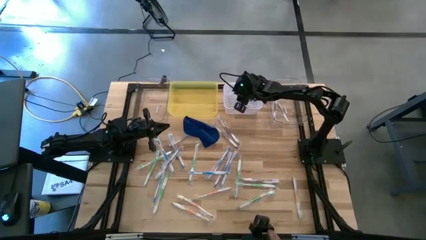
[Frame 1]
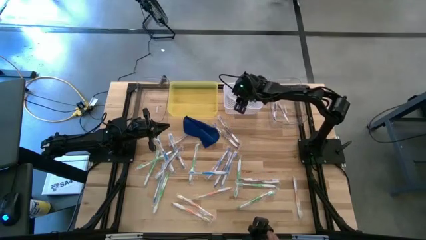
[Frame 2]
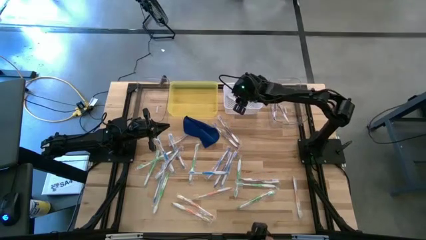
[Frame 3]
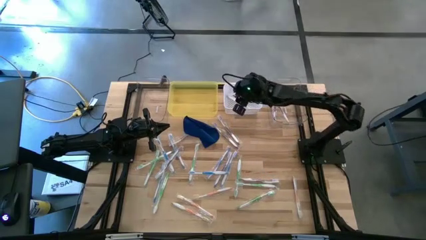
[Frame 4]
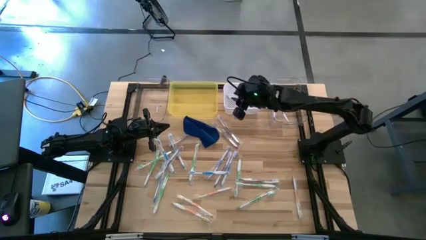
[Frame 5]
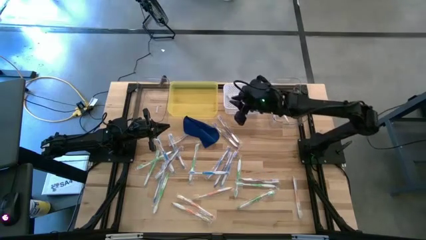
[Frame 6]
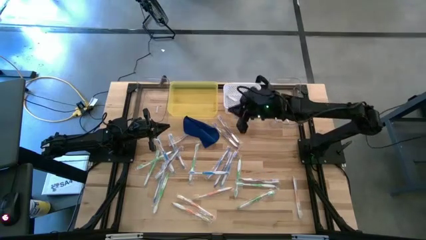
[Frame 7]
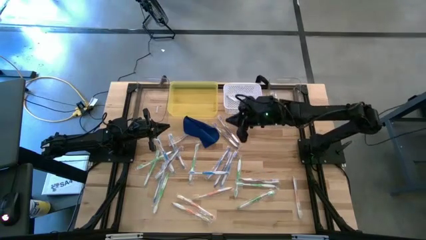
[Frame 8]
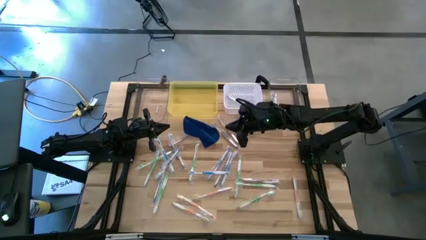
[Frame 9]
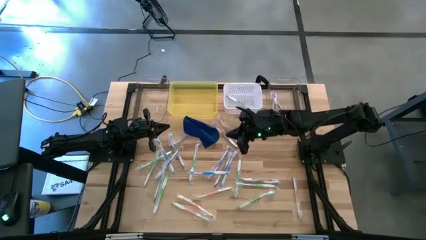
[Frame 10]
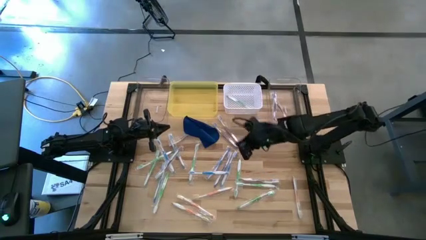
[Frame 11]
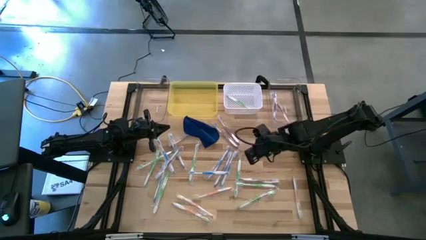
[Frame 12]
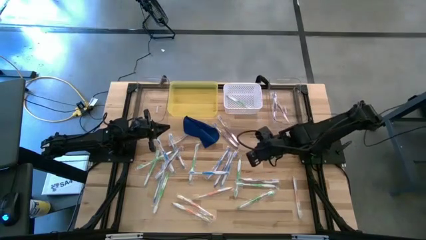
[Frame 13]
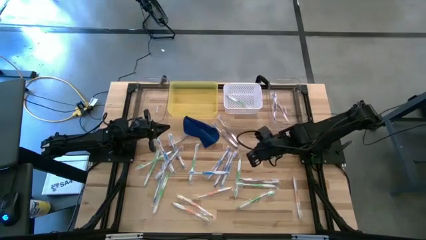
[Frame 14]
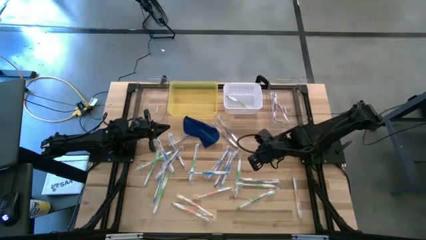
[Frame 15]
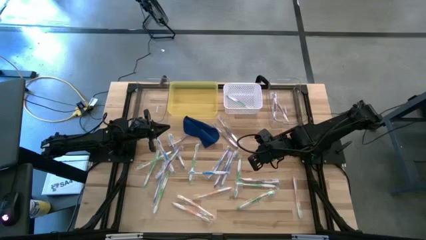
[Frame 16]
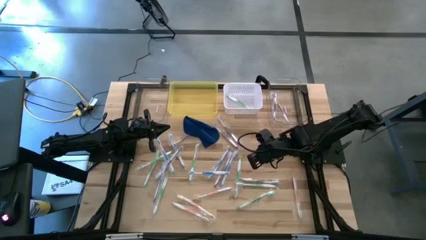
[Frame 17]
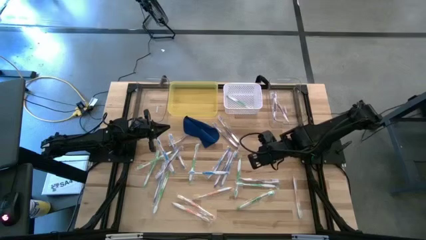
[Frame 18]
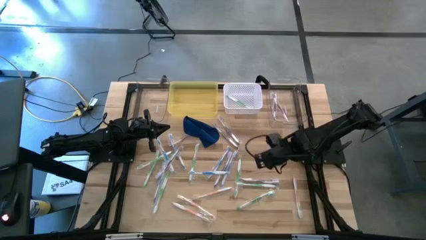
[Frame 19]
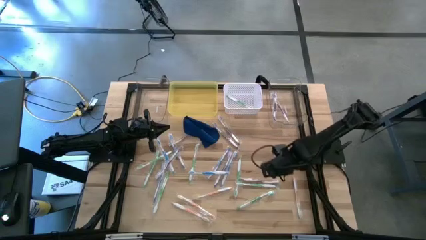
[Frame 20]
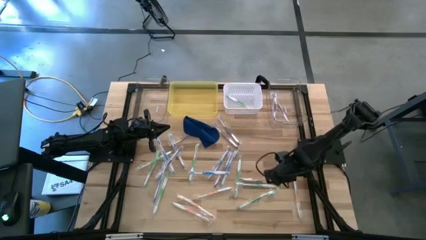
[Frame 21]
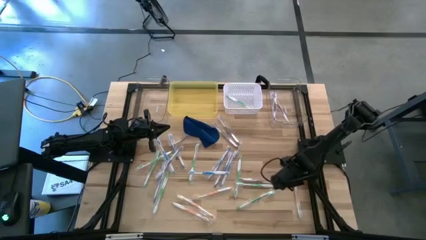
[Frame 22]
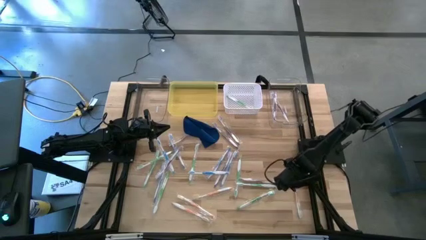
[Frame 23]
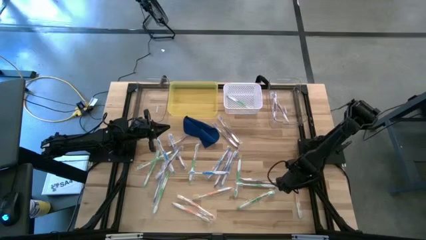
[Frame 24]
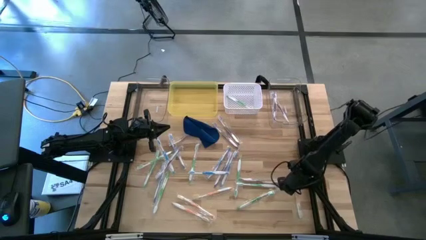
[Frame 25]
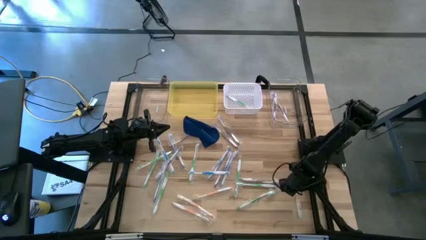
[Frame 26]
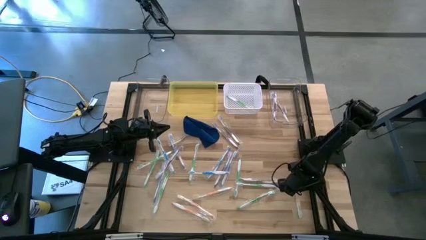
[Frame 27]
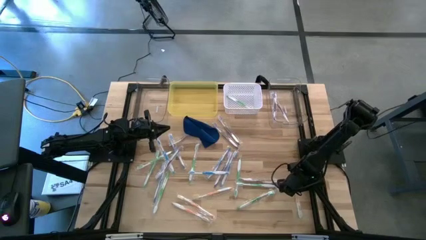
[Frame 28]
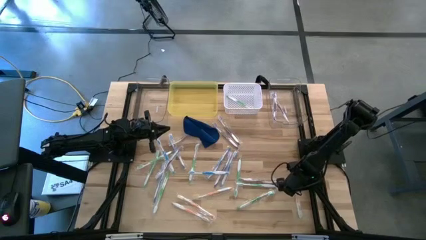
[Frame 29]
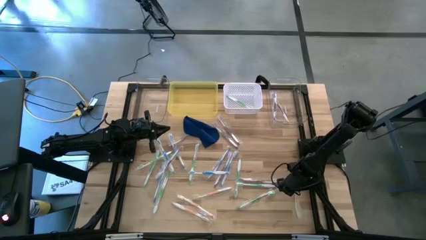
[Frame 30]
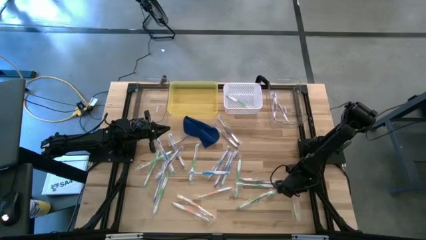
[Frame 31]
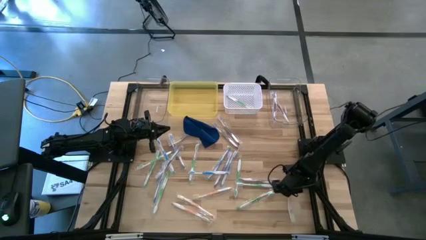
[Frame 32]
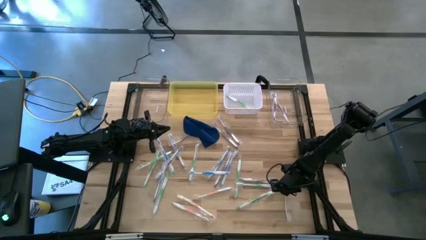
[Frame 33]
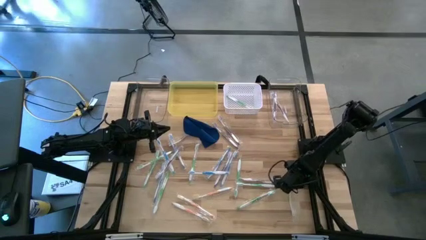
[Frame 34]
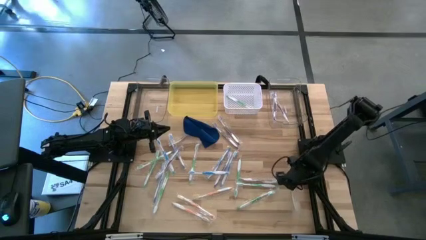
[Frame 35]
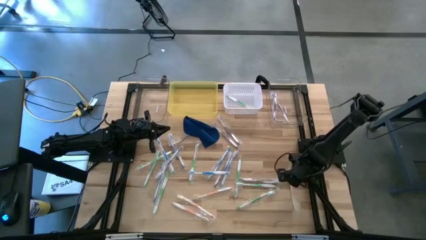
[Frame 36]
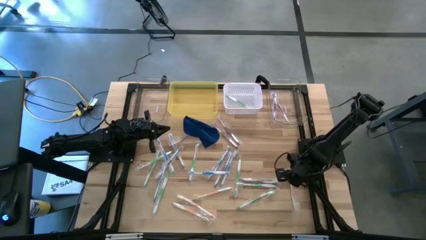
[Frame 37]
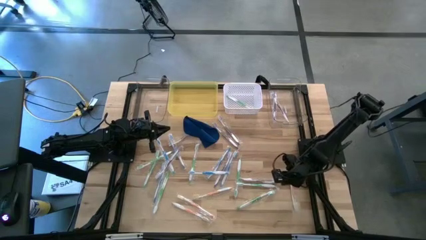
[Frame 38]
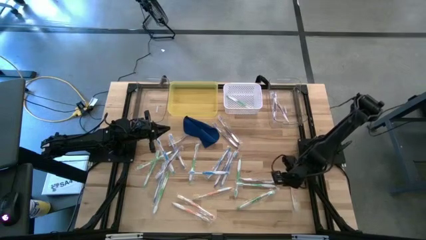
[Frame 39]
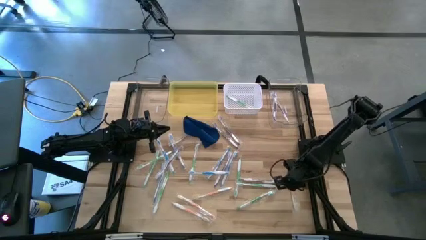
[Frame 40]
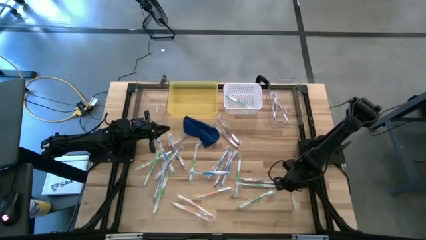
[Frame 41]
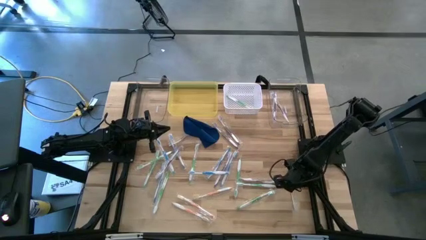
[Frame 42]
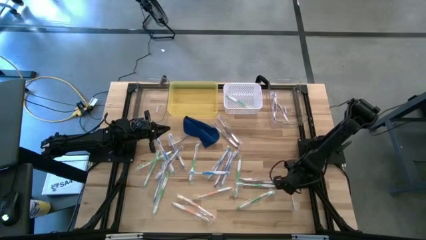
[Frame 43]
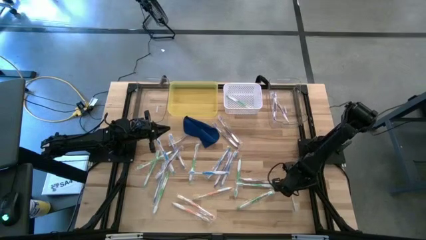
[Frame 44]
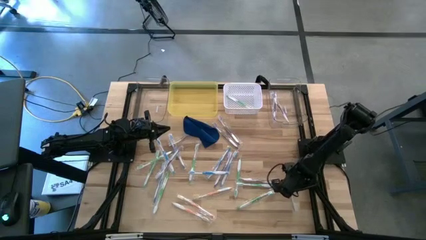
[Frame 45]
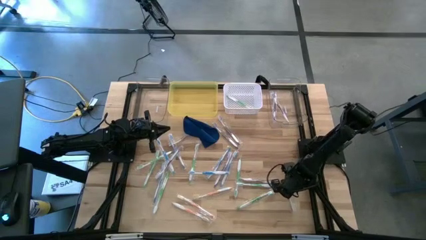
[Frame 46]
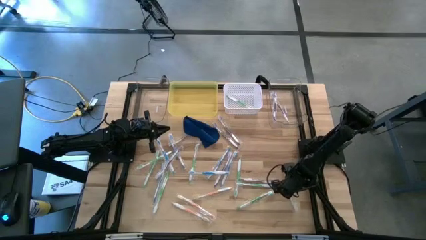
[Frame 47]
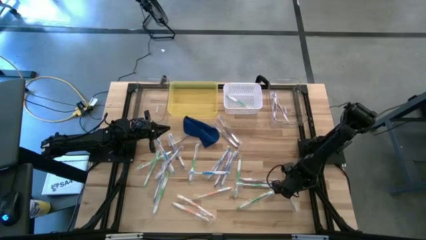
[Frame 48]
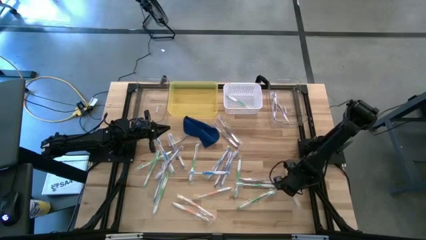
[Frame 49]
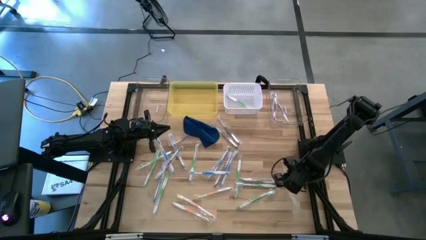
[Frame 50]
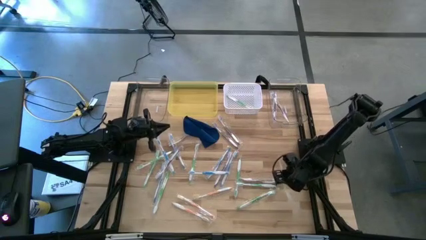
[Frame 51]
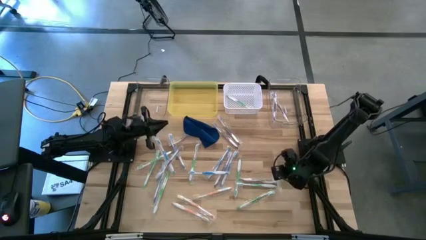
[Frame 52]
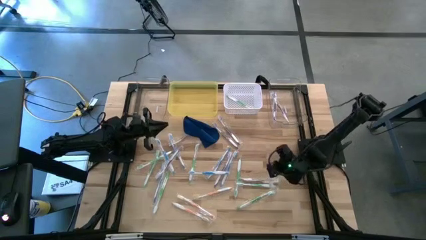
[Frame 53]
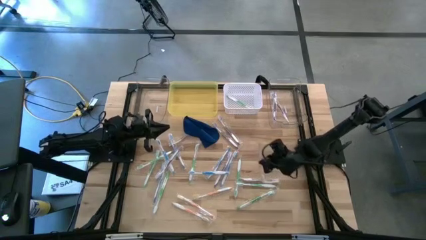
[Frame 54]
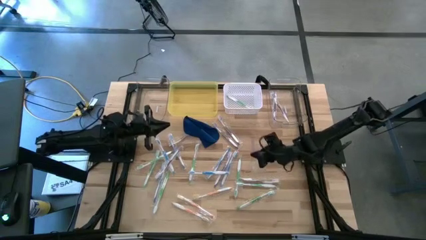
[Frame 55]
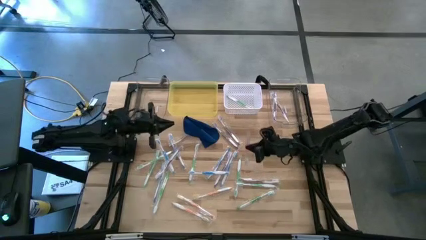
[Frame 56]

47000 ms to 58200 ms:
Task: Pick & Place Toothbrushes
Put the orange toothbrush into left transparent bin
